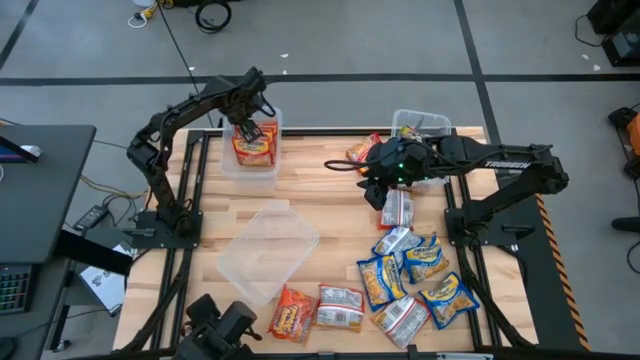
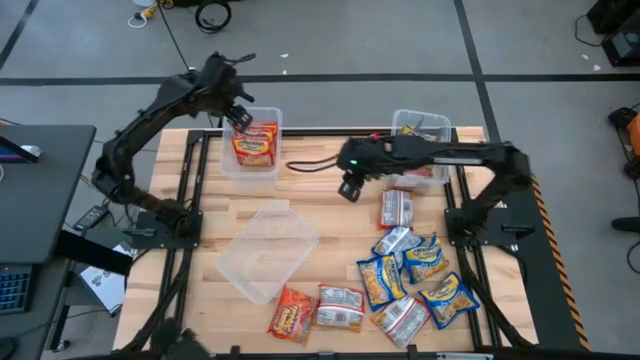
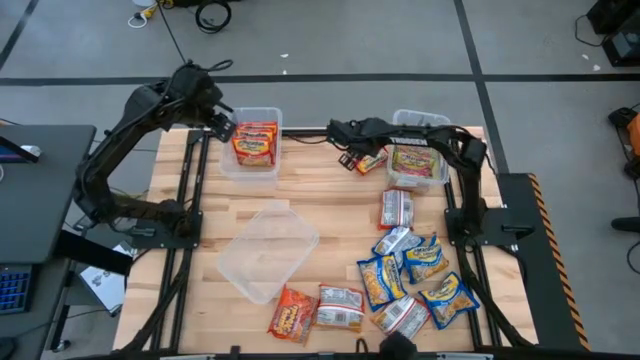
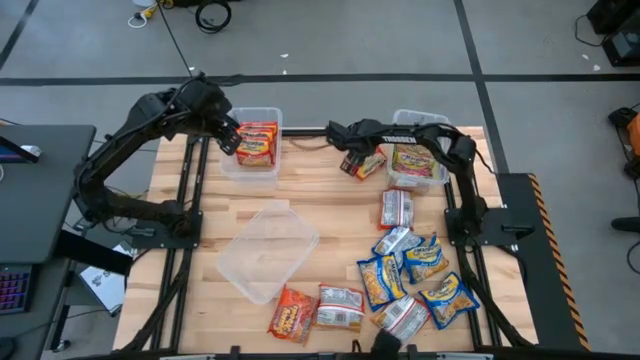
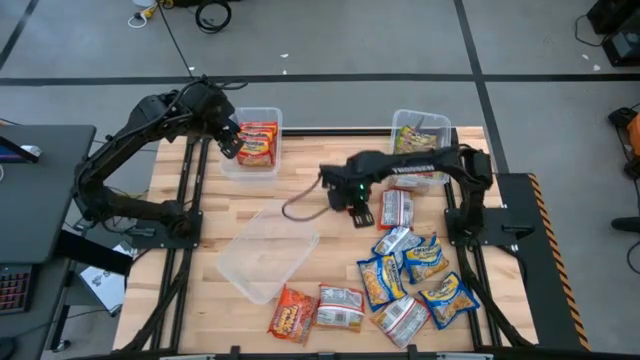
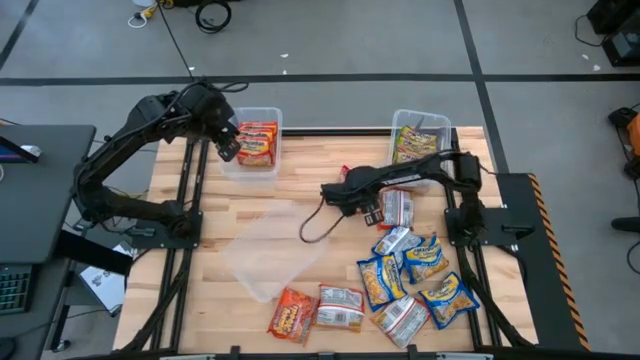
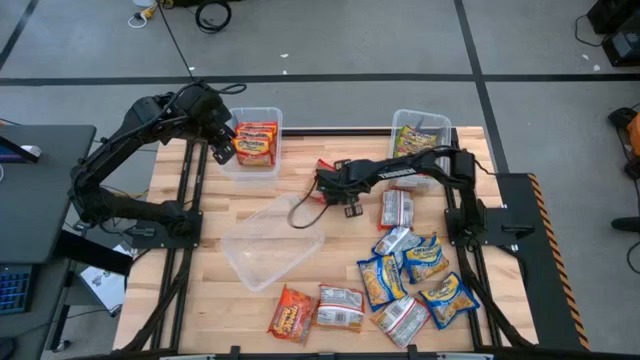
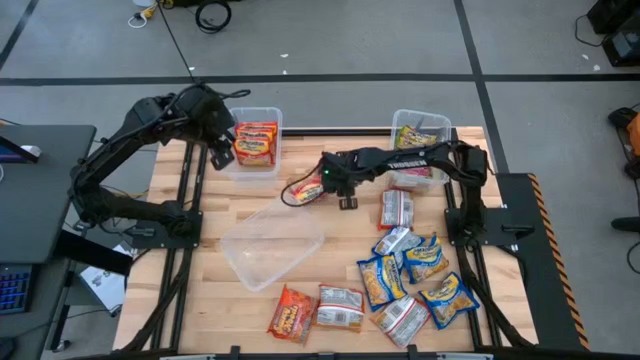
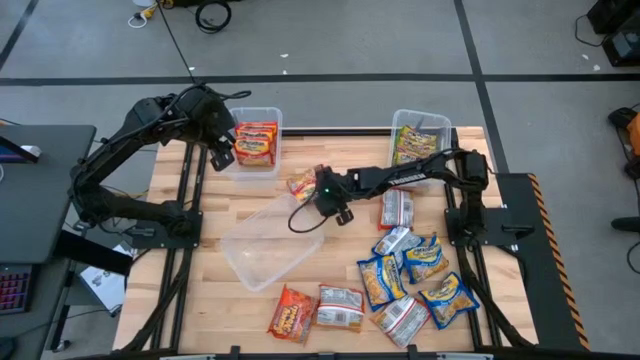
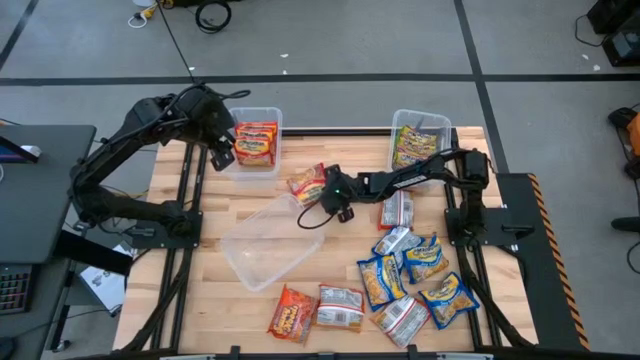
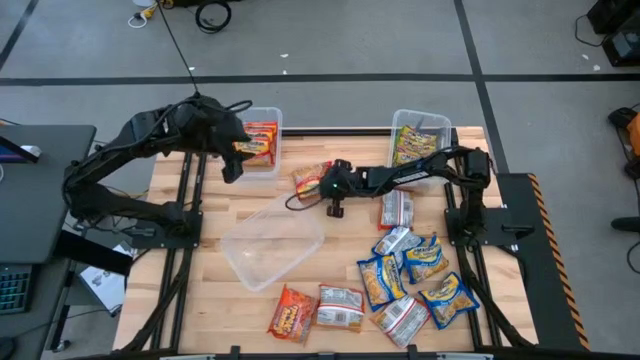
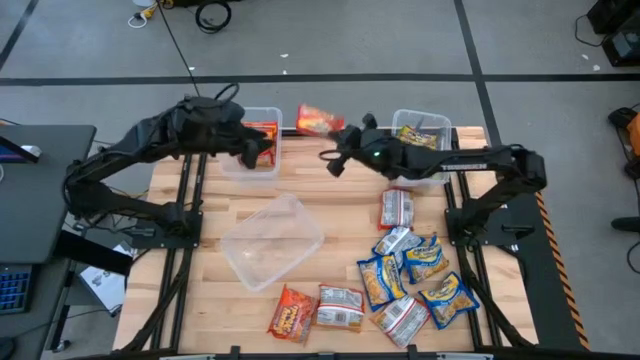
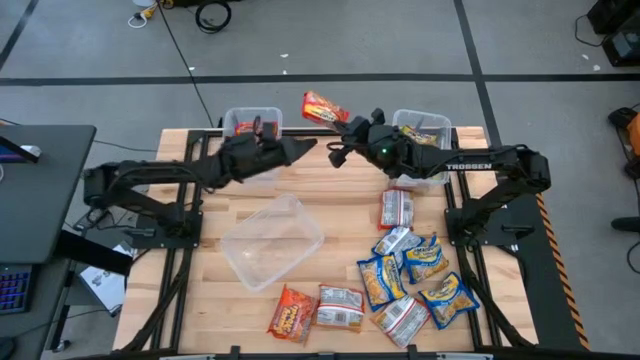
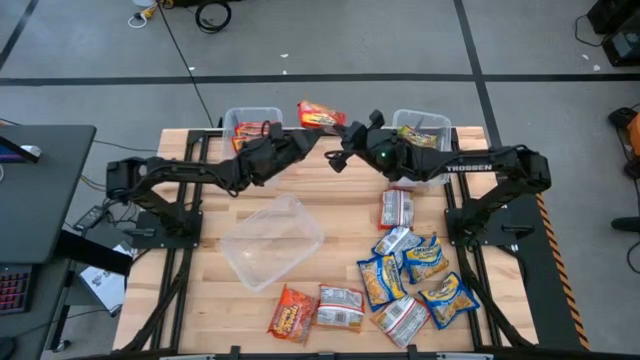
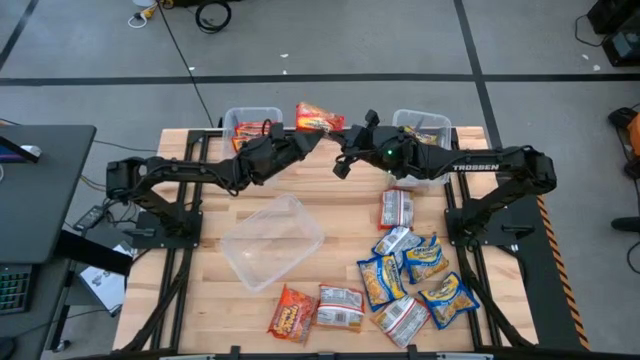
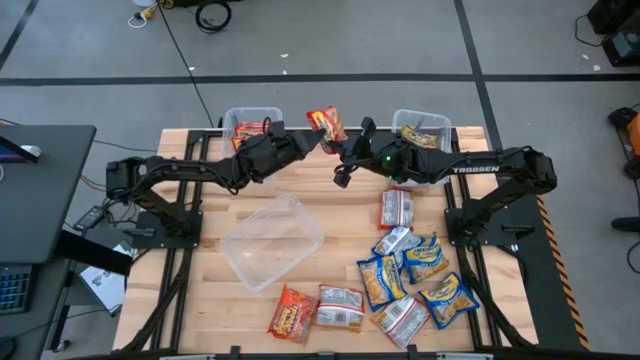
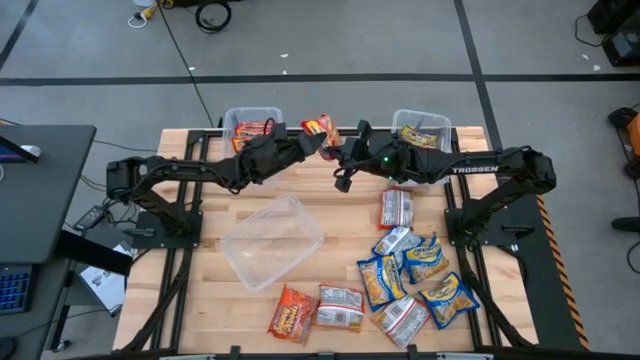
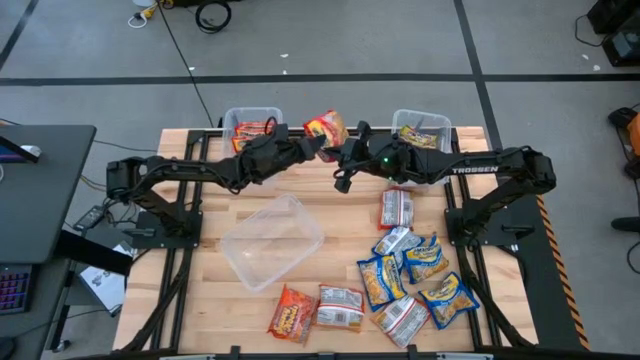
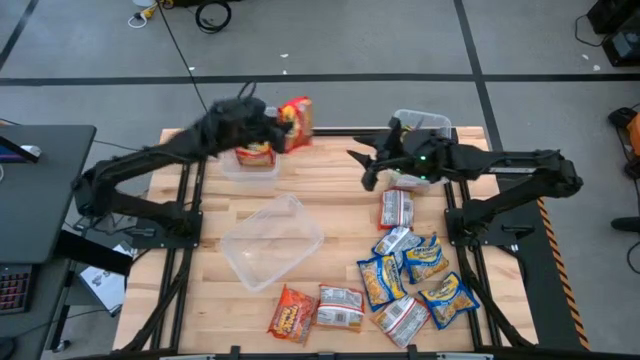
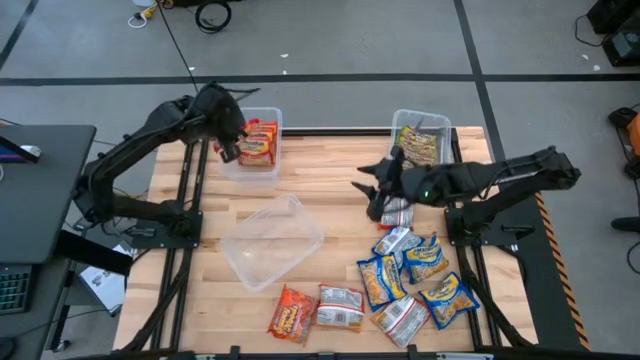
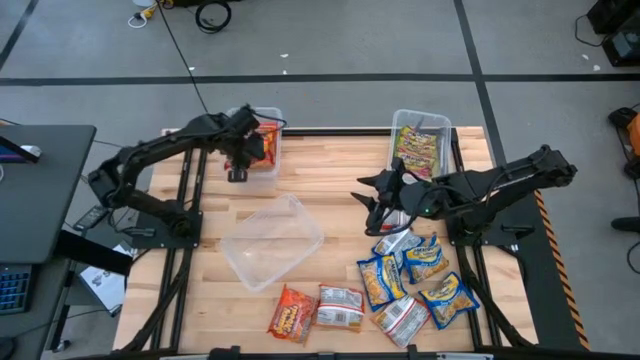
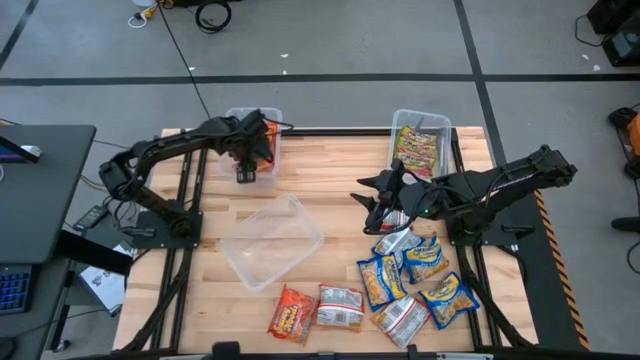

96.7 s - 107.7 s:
Task: Sort Maruchan noodles
Put the orange noodle pack into the top left transparent bin

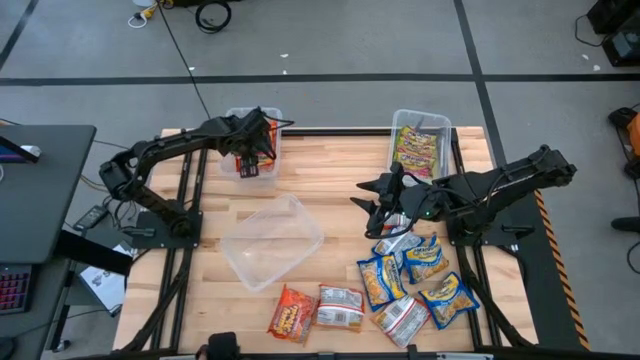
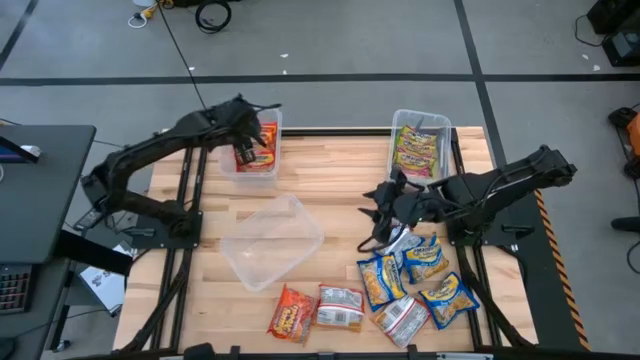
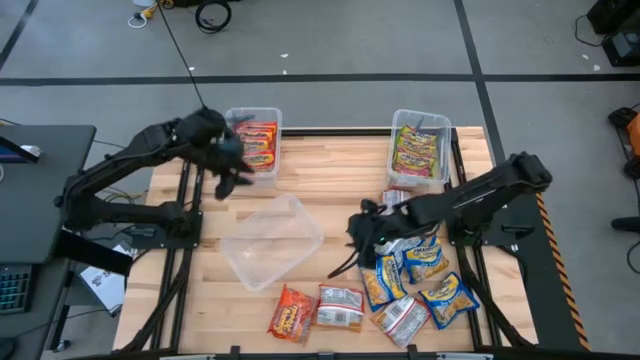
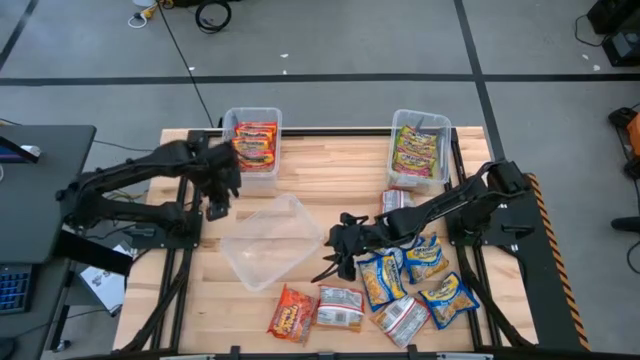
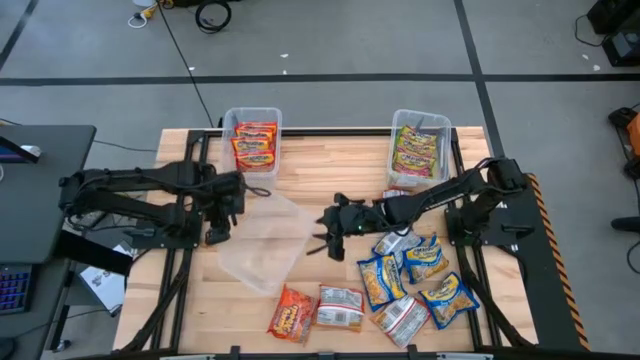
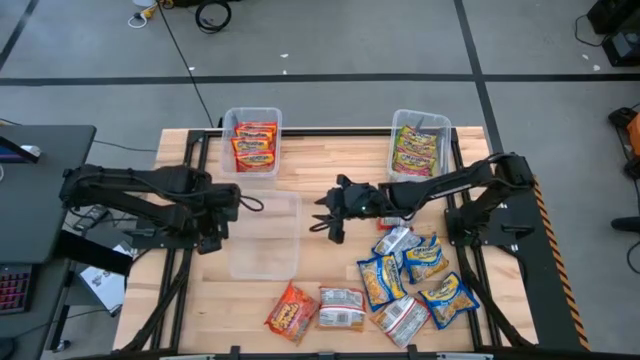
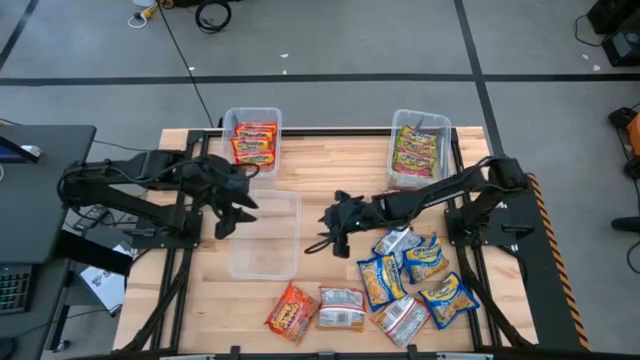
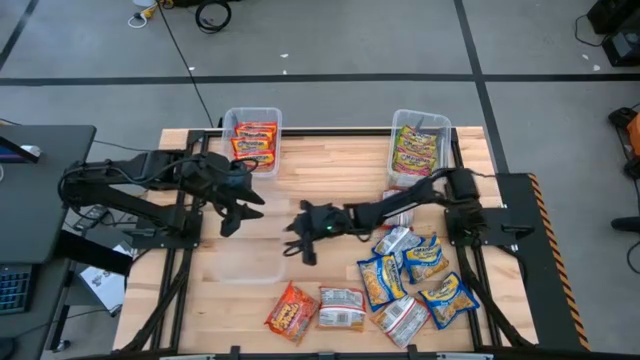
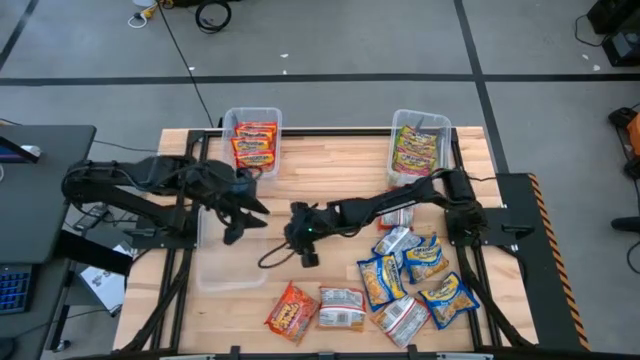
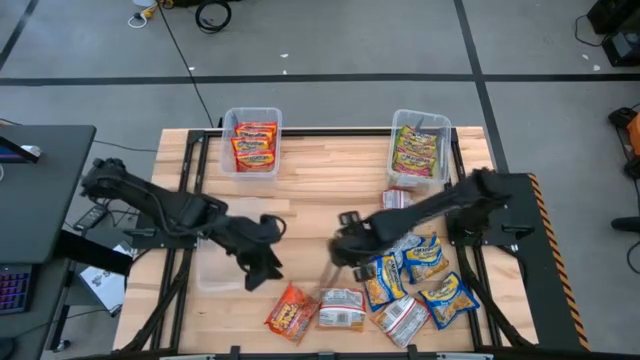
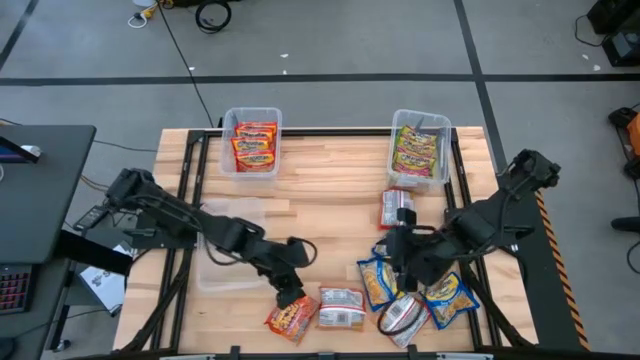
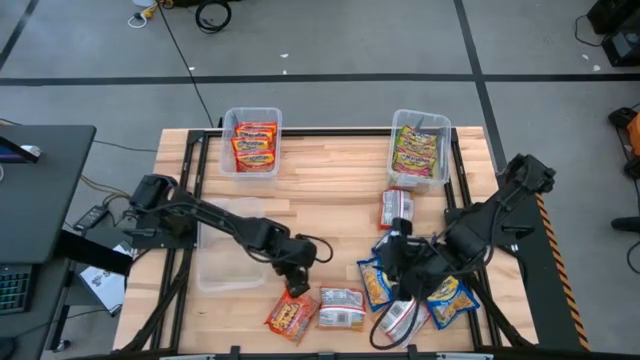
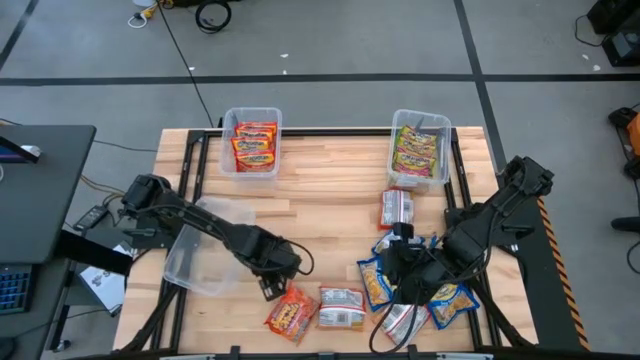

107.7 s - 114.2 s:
Adjust the bottom transparent bin on the table

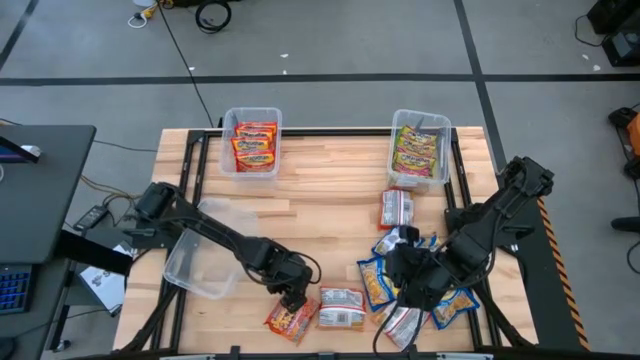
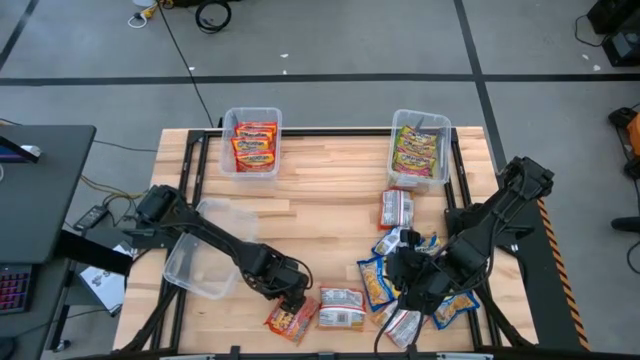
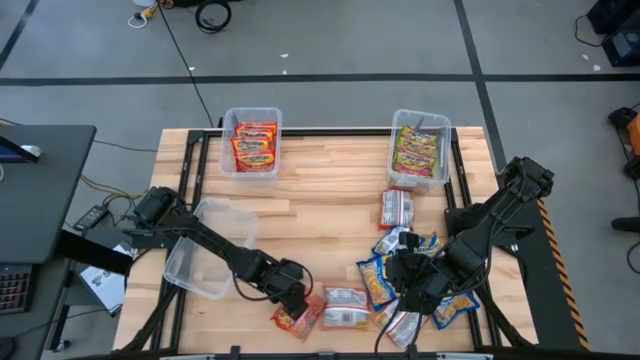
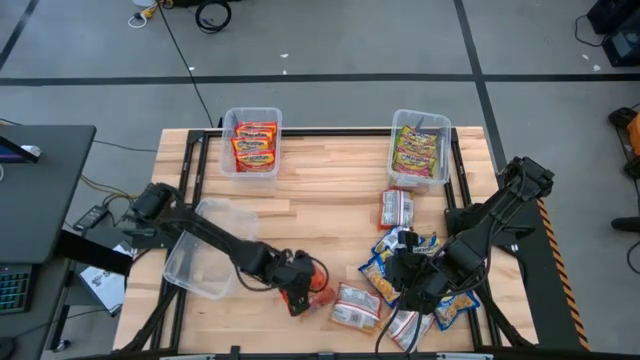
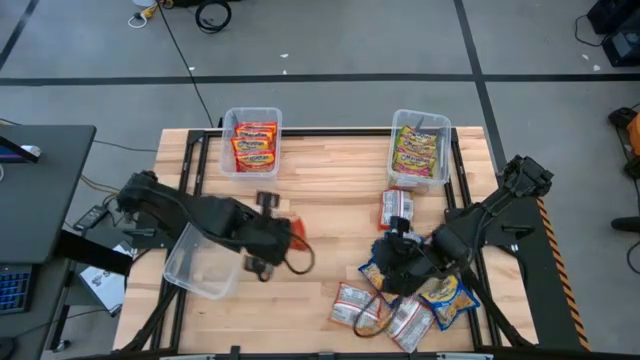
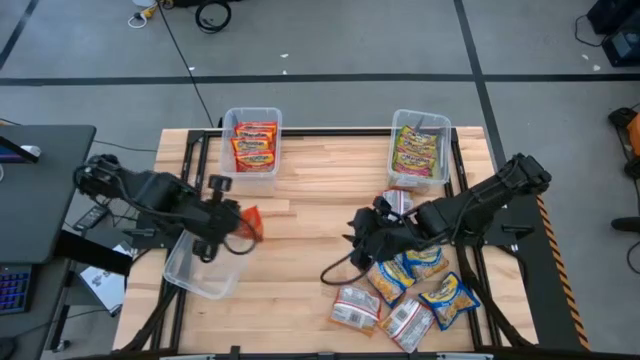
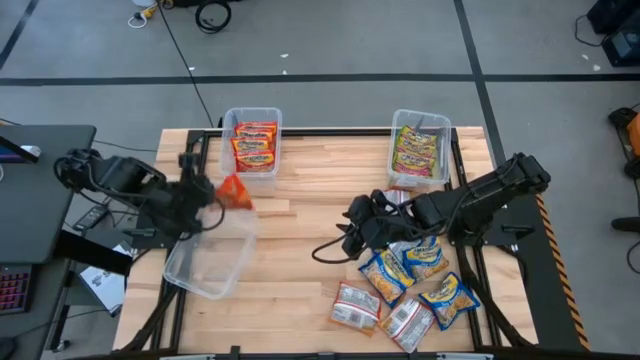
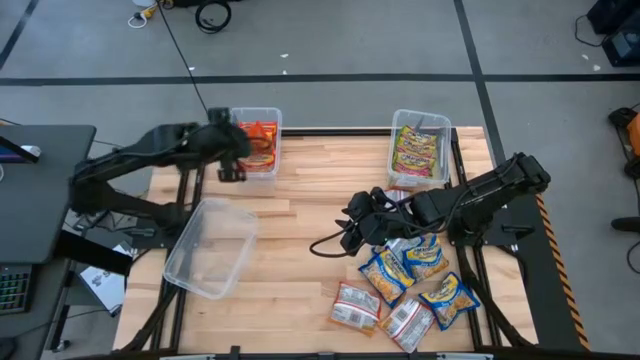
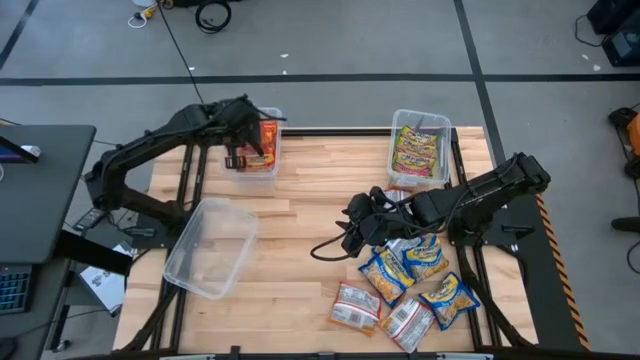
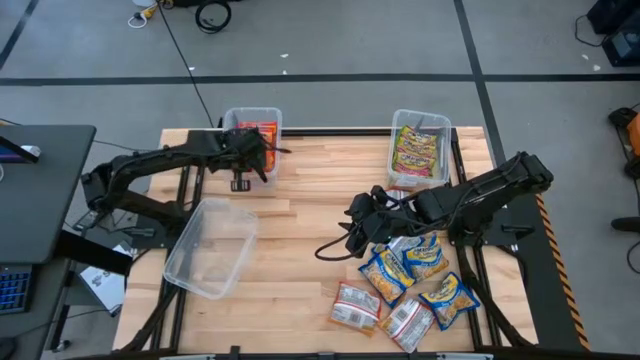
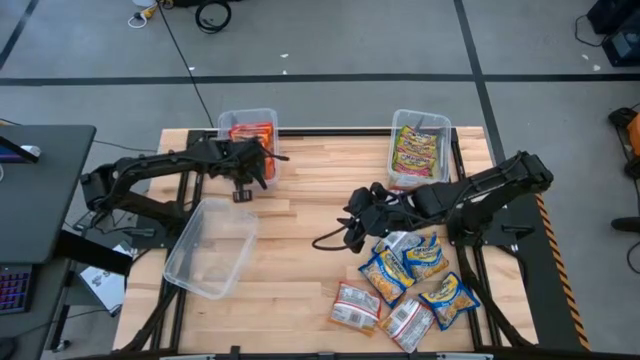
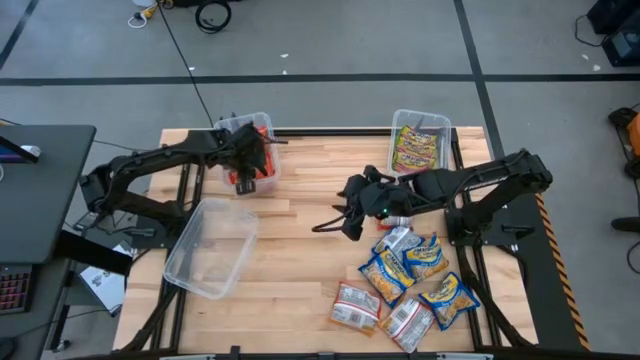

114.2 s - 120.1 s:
Put the orange noodle pack into the top left transparent bin
